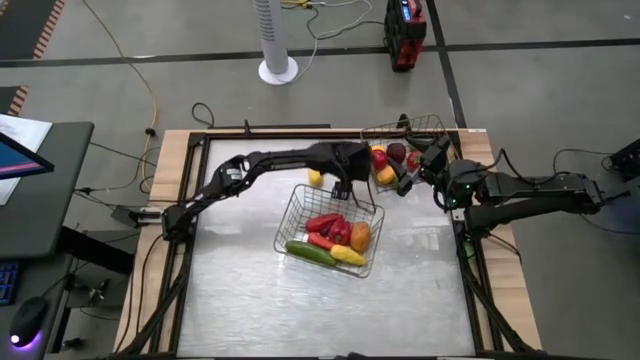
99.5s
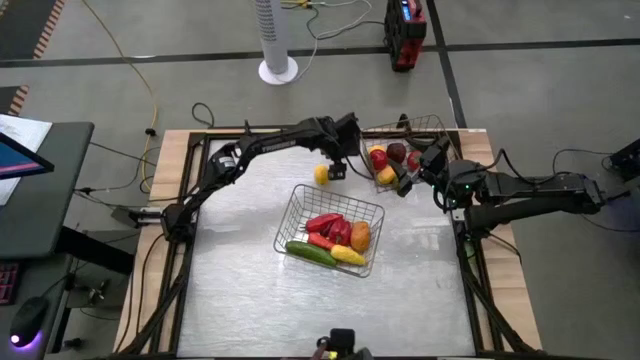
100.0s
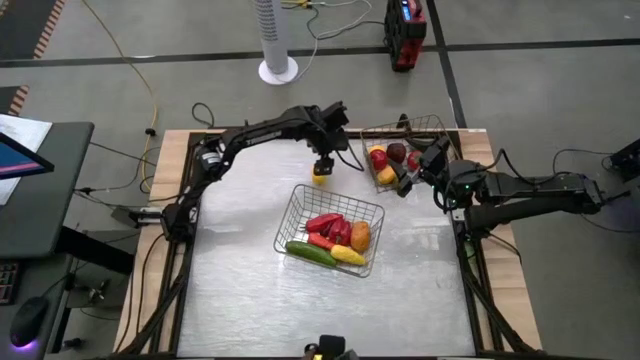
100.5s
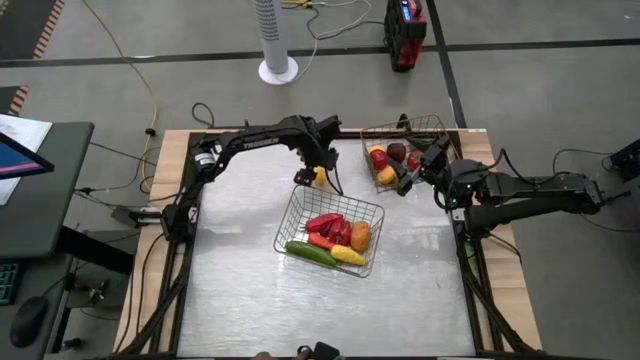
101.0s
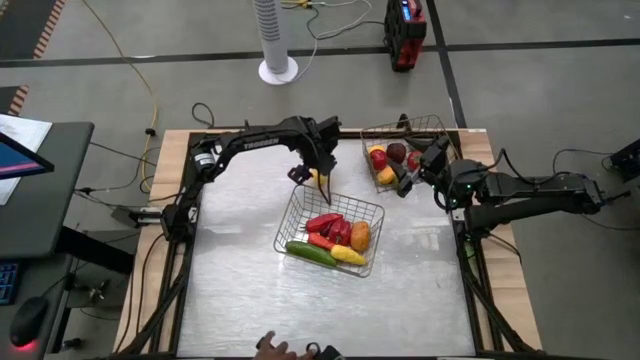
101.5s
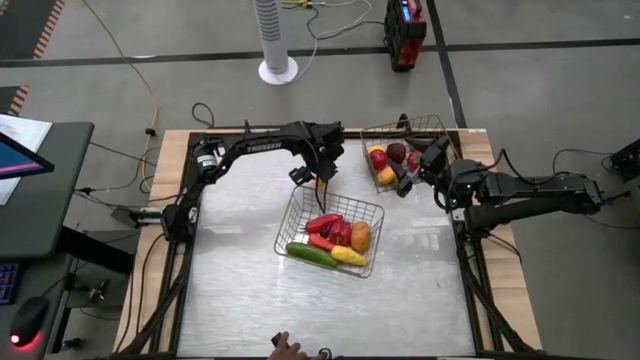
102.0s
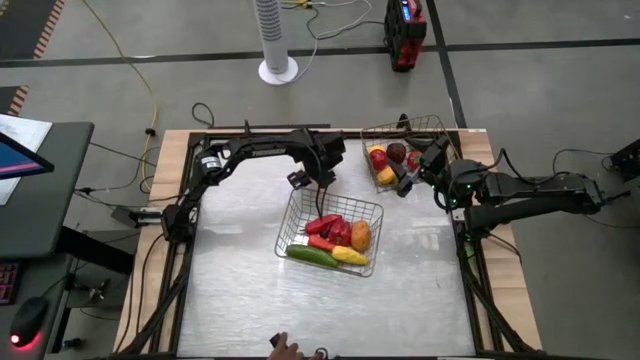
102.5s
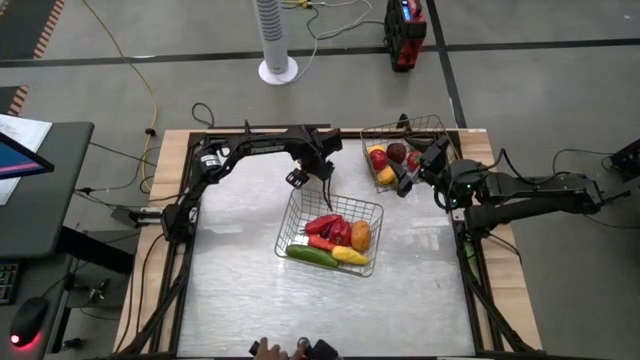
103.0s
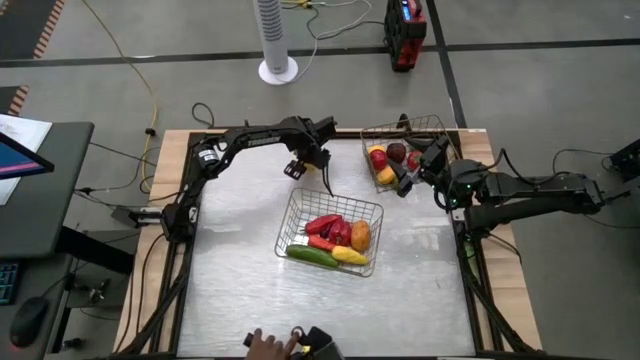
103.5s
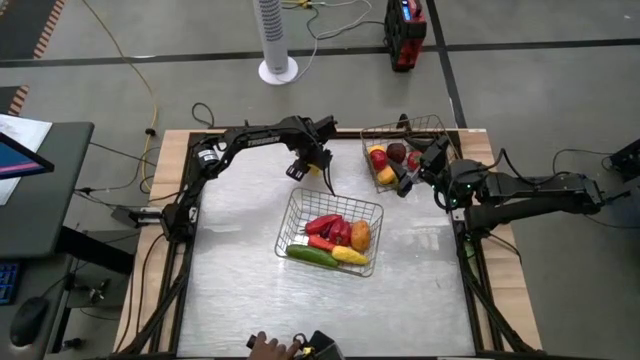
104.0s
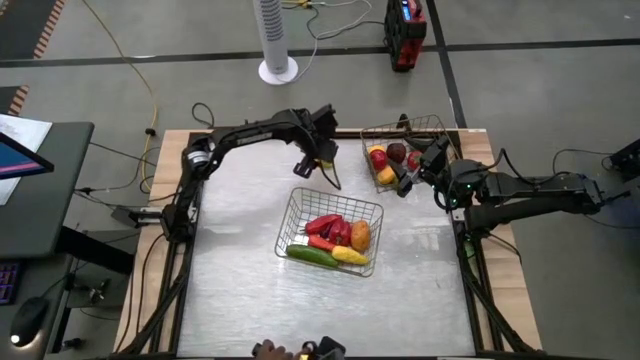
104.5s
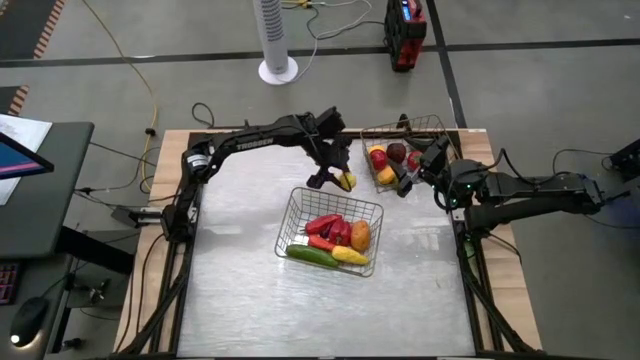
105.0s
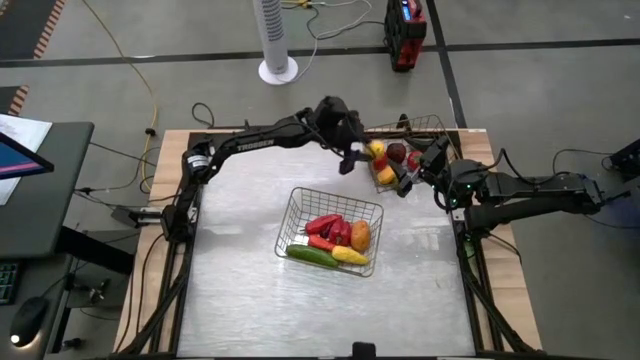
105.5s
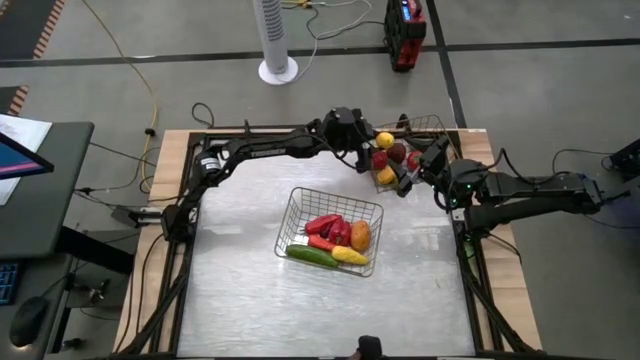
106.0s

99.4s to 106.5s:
Task: Sort produce into baskets
Put the yellow lemon into the right wire basket

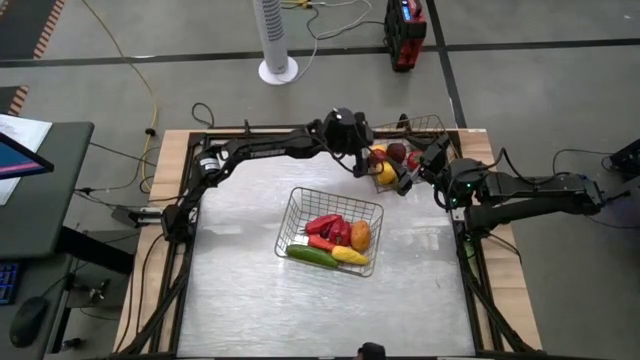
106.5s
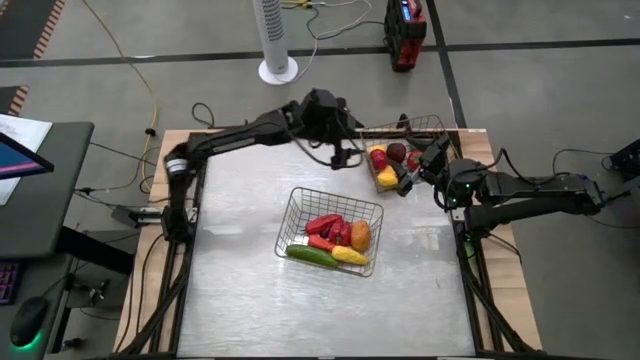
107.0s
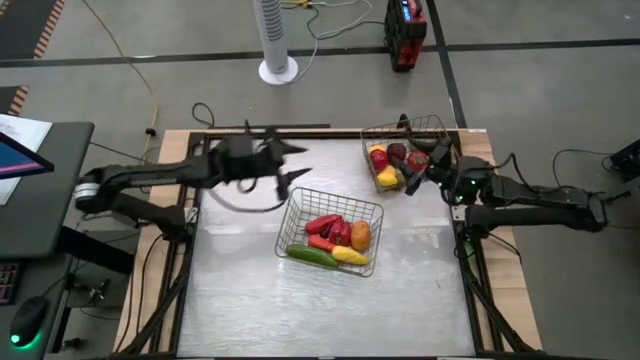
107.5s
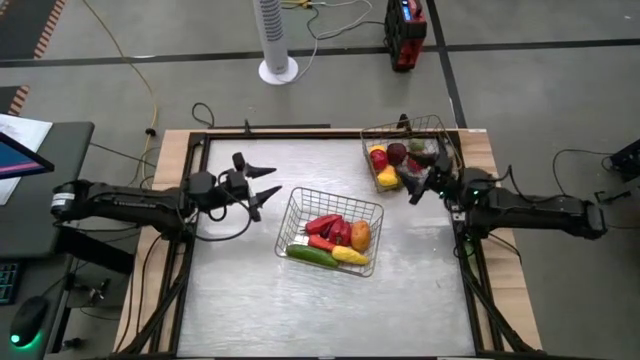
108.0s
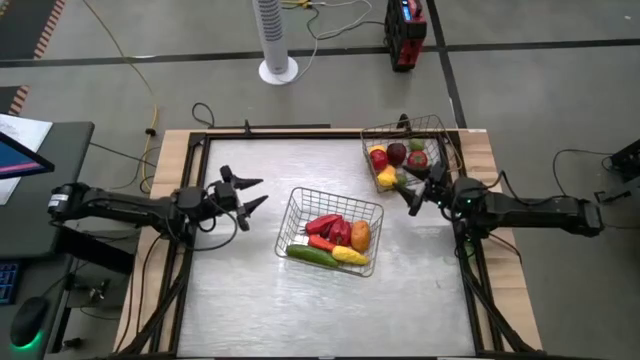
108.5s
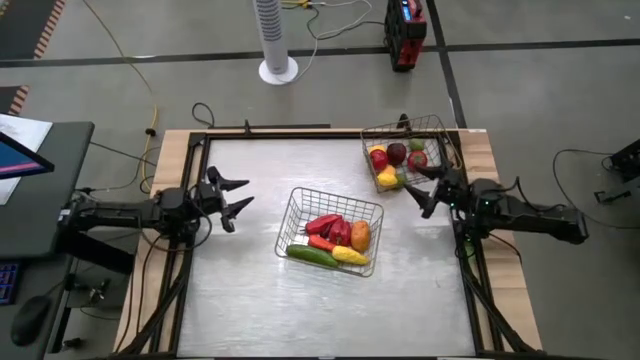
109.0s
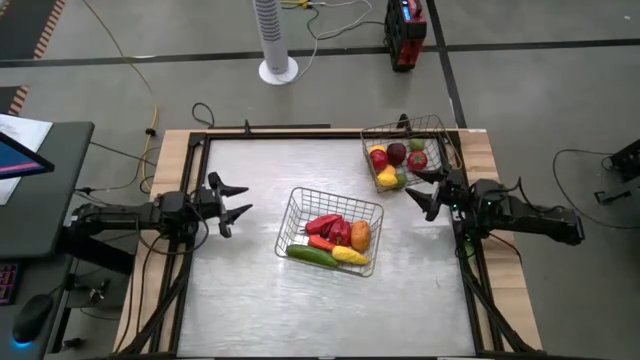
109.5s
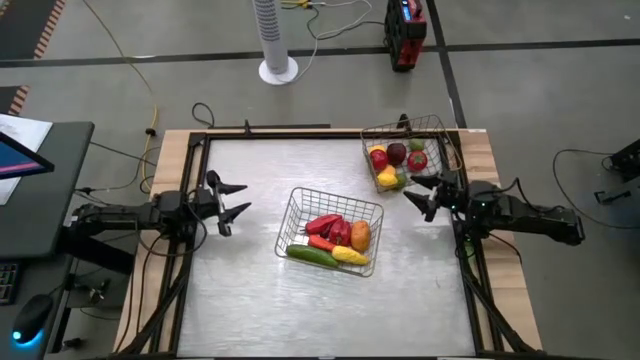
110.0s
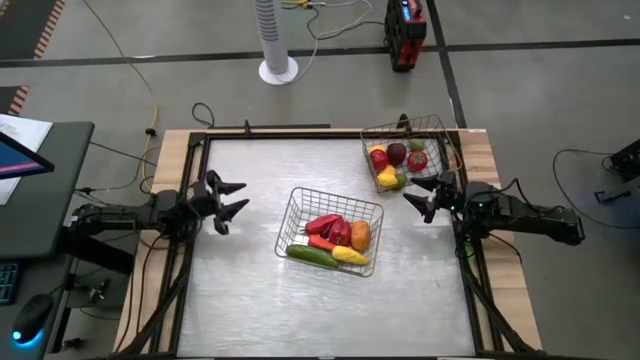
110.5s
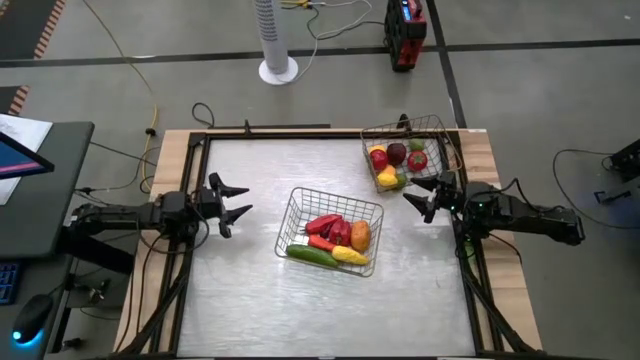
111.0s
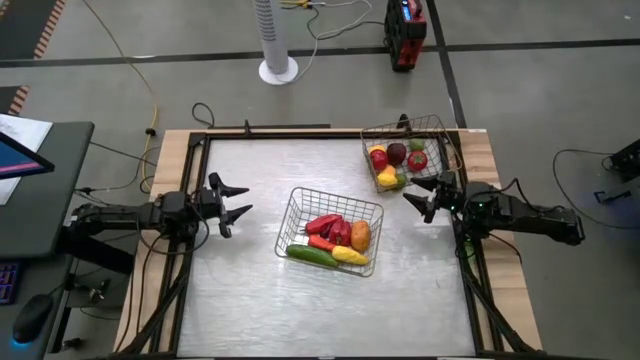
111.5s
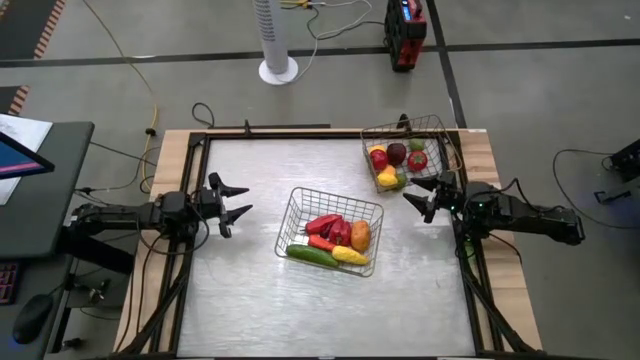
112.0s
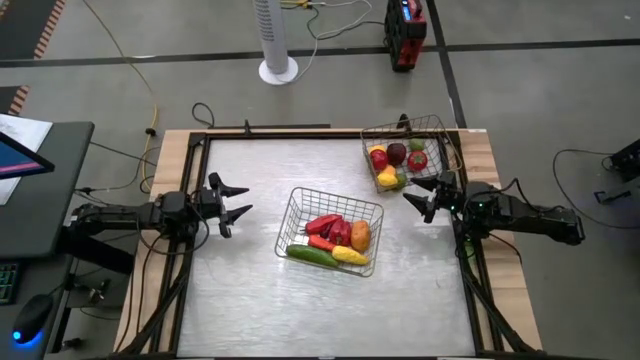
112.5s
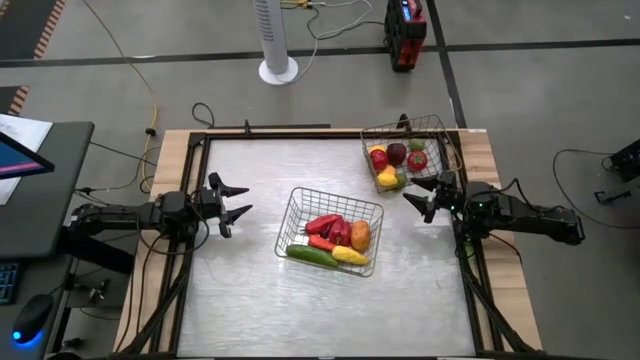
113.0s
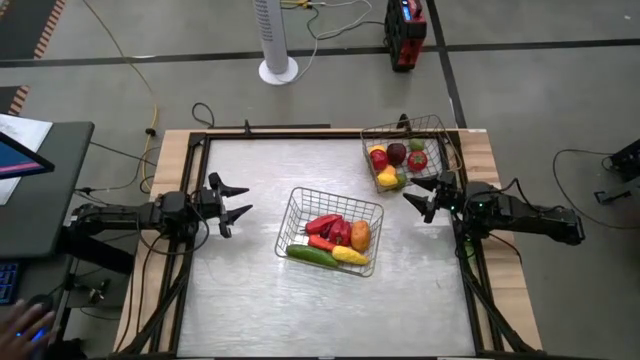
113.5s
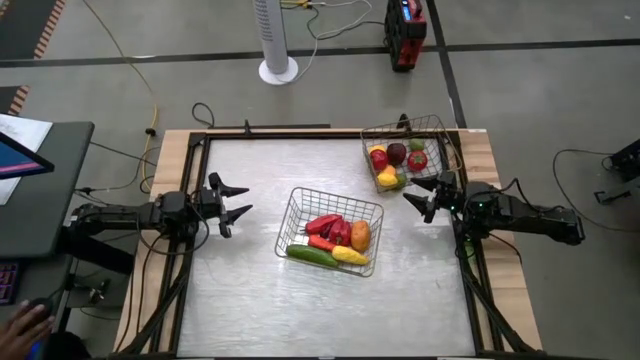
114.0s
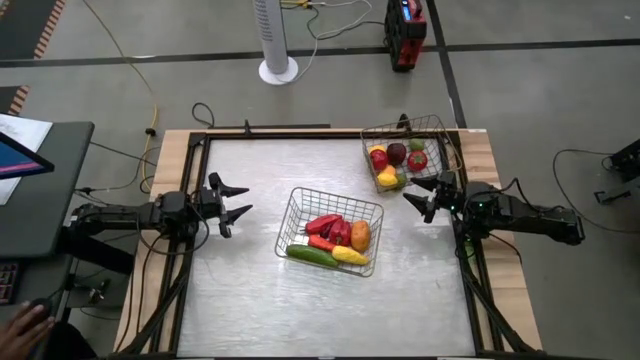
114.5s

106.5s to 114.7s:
Return to Home Position
